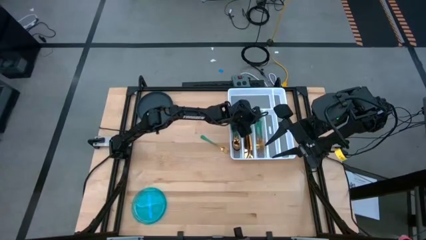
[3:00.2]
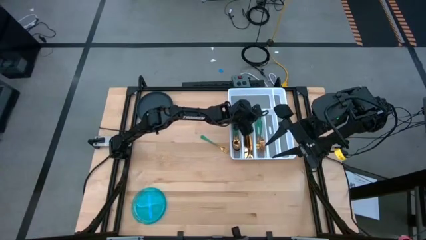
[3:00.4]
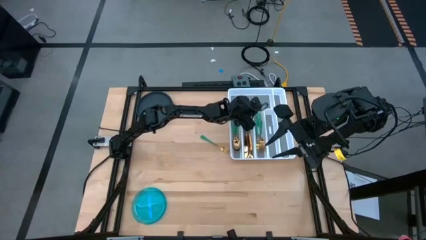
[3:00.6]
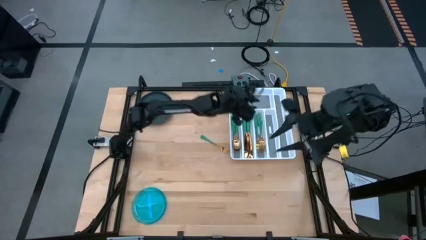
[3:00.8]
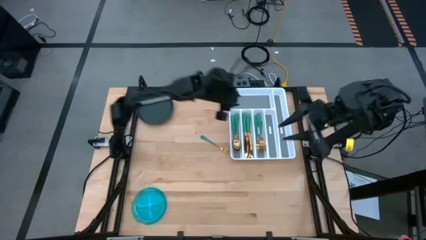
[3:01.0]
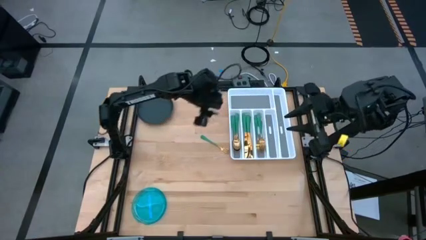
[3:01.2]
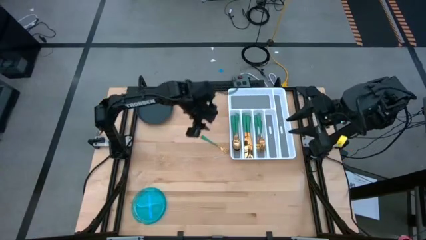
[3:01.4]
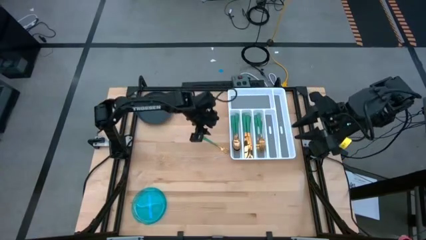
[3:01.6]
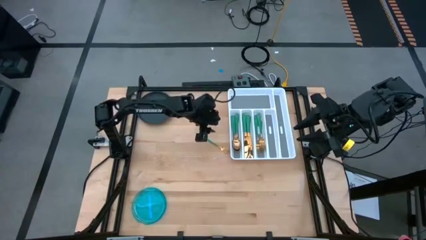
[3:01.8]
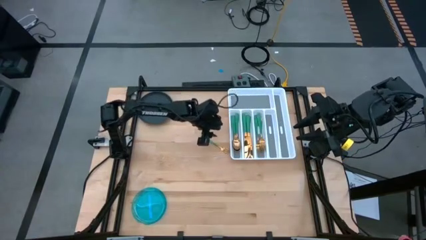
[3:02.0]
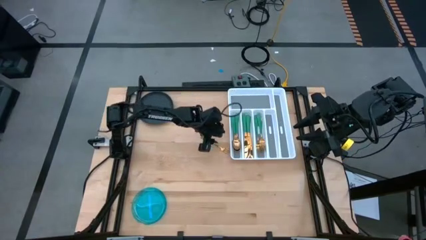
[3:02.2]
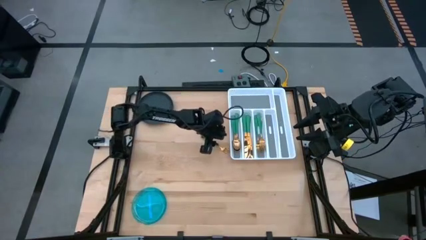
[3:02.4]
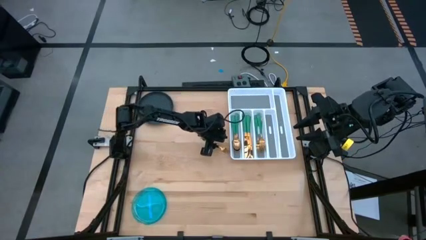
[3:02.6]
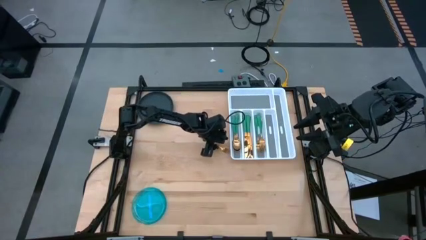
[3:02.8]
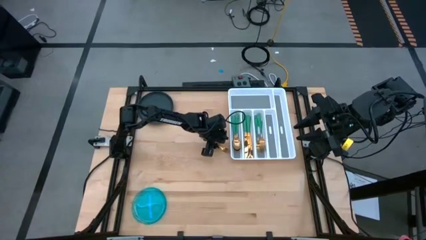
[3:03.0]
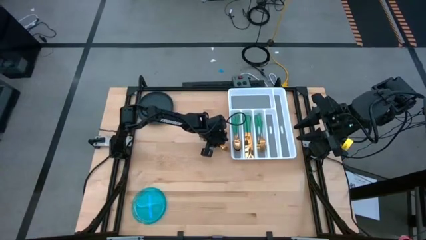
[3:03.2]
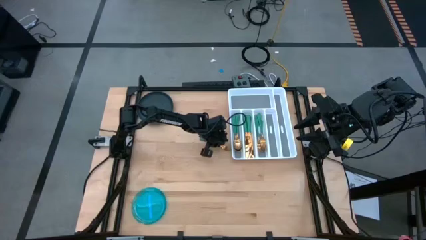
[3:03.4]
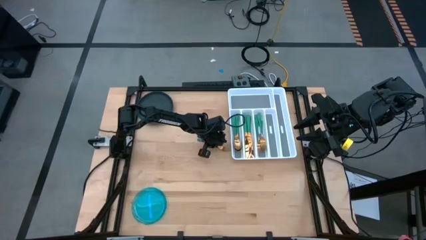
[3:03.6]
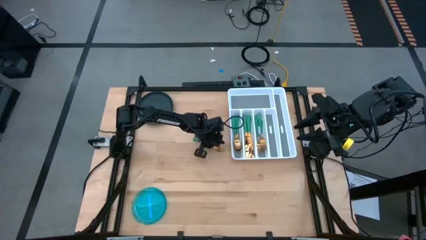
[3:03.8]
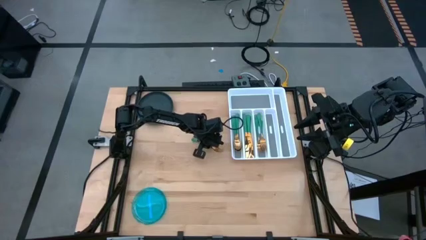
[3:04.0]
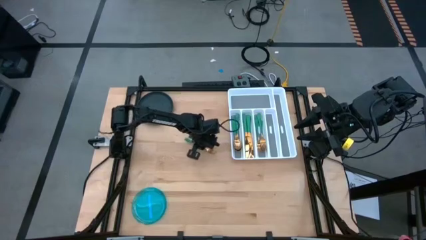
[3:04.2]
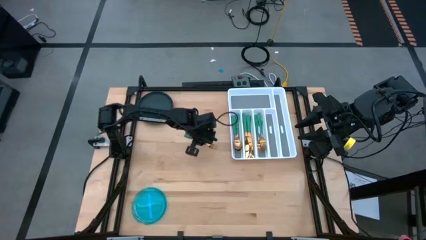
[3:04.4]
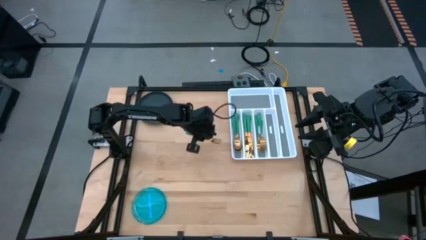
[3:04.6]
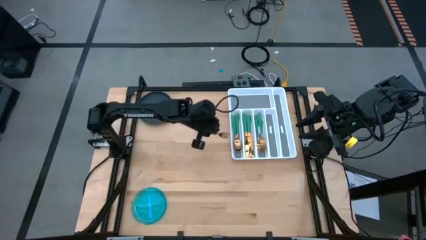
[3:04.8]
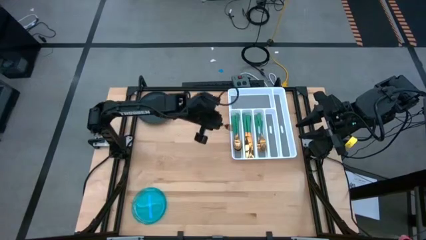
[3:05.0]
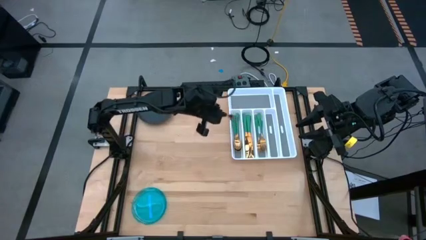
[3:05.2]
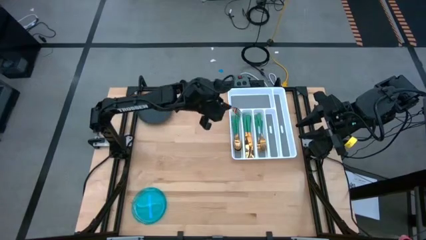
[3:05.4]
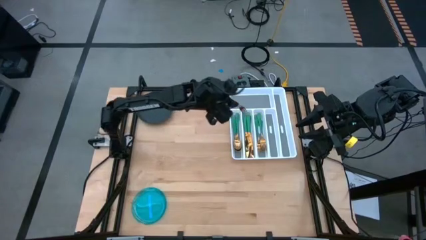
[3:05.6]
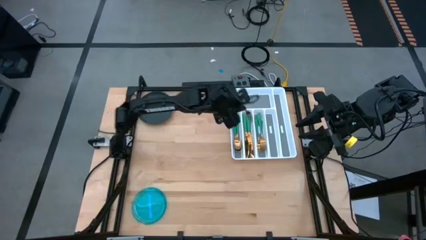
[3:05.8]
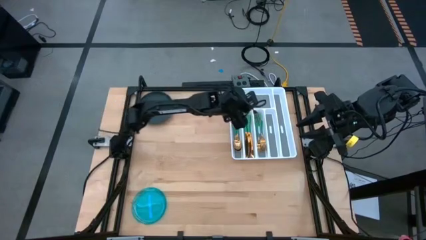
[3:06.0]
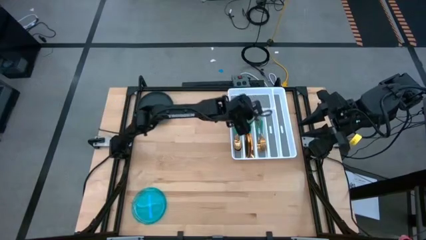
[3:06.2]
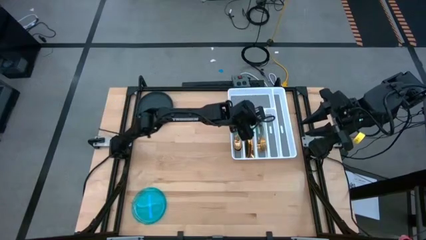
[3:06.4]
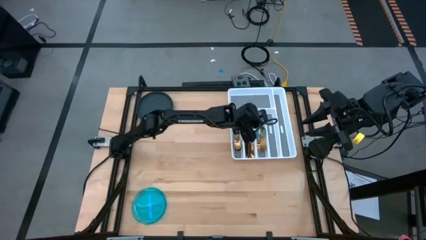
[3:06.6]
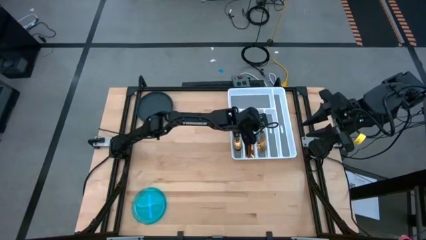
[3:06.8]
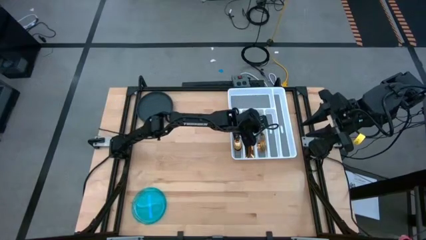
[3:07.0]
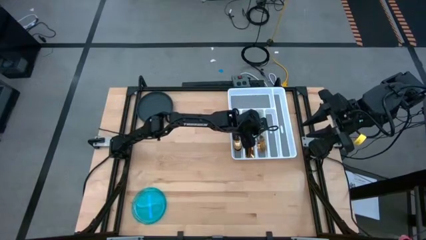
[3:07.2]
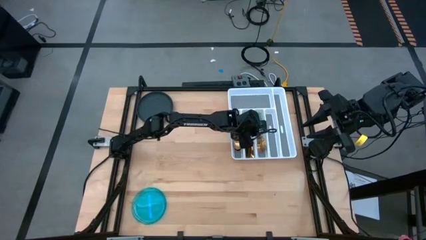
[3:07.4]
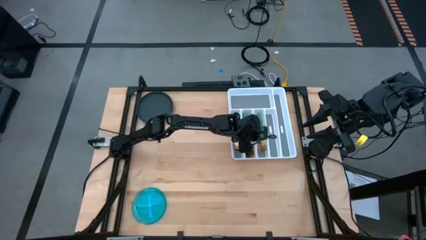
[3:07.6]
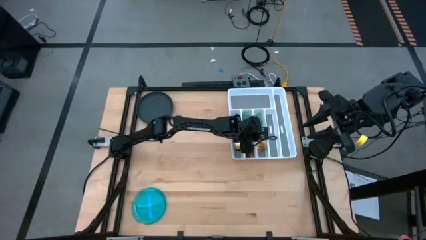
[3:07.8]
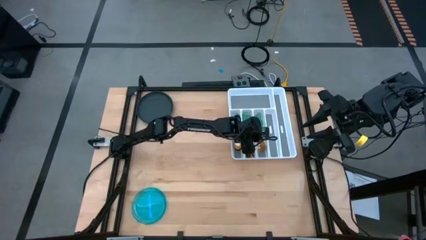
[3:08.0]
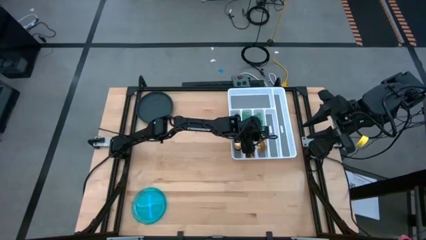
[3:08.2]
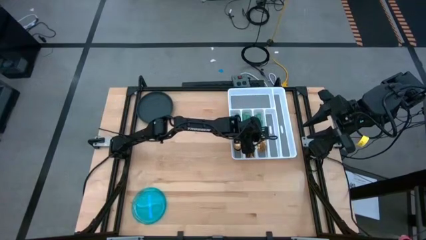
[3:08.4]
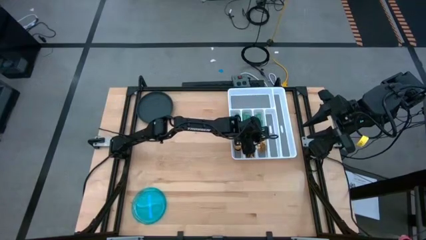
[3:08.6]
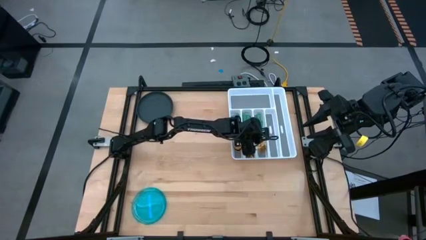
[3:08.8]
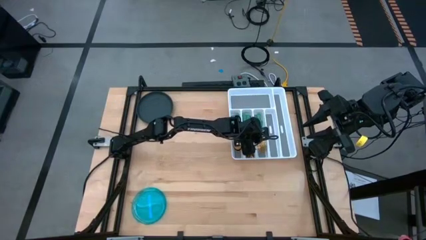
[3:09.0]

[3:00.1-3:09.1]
Task: Sort silverware
Put the green fork into the middle right slot of the white silverware tray

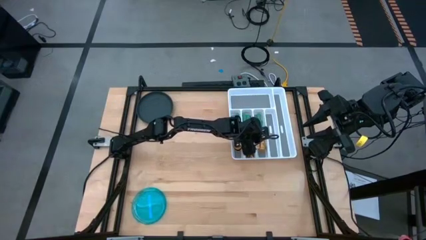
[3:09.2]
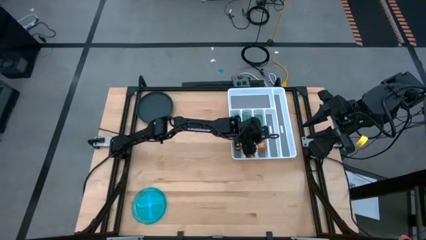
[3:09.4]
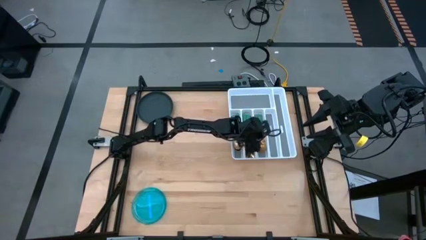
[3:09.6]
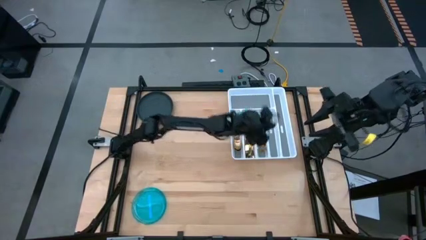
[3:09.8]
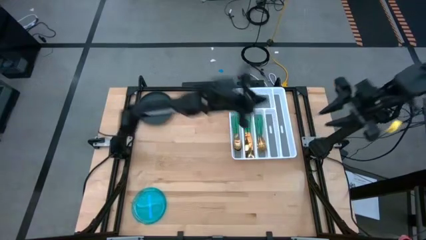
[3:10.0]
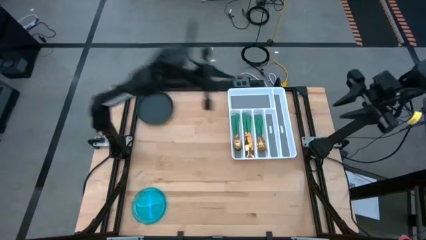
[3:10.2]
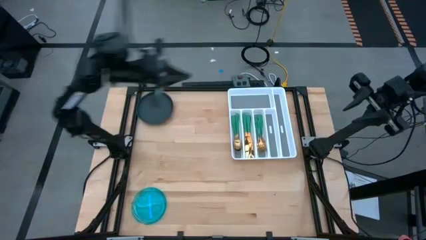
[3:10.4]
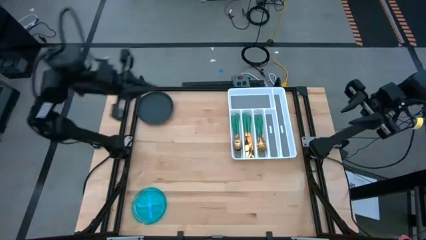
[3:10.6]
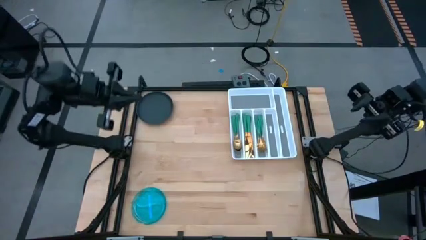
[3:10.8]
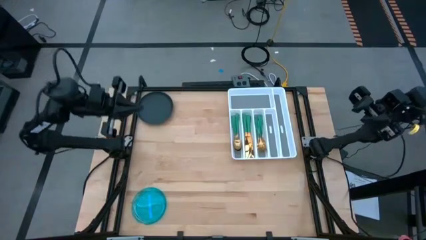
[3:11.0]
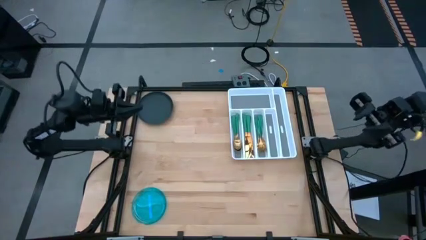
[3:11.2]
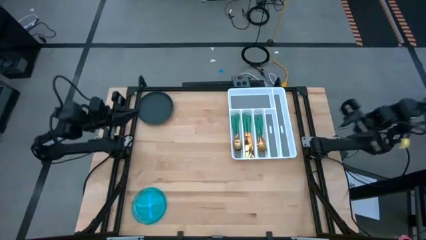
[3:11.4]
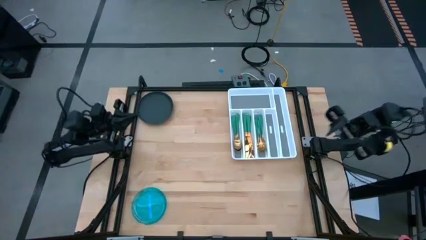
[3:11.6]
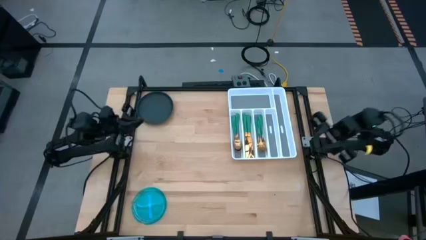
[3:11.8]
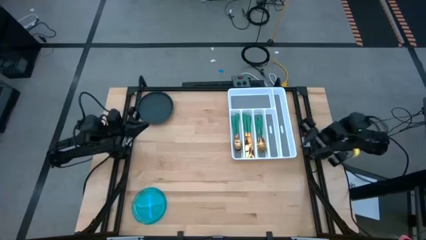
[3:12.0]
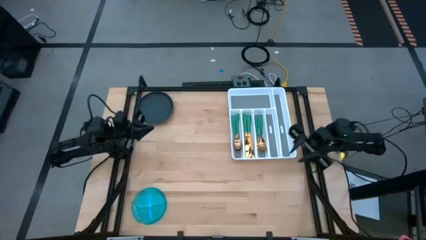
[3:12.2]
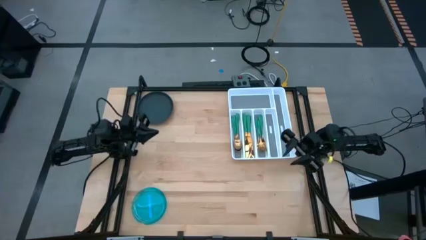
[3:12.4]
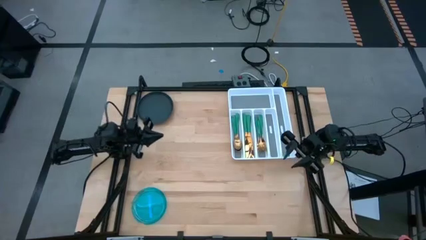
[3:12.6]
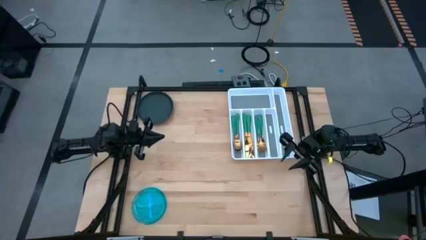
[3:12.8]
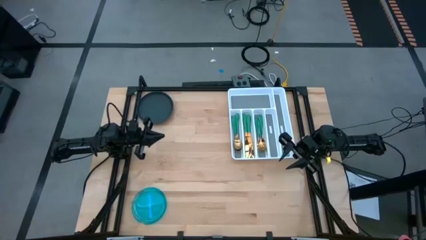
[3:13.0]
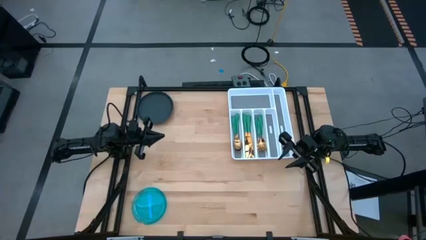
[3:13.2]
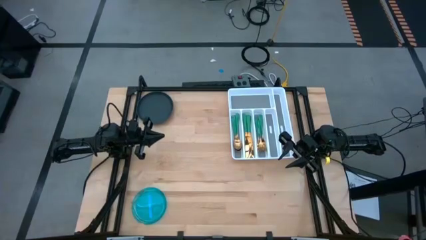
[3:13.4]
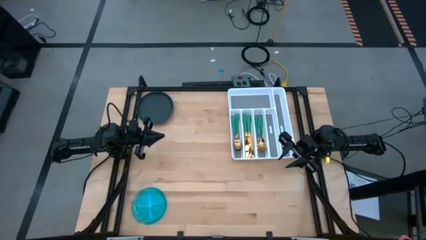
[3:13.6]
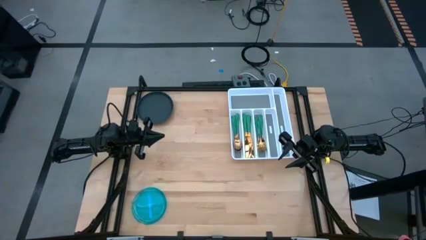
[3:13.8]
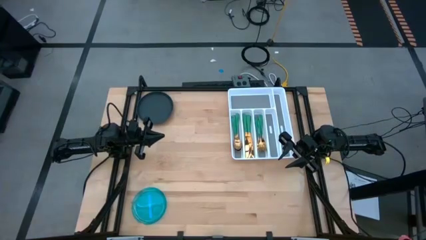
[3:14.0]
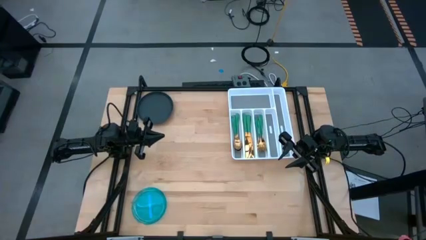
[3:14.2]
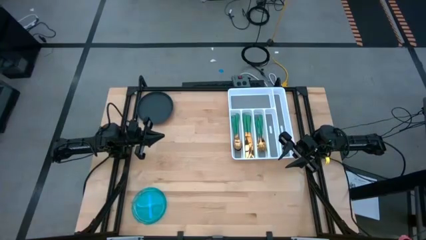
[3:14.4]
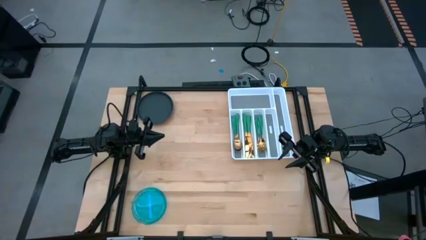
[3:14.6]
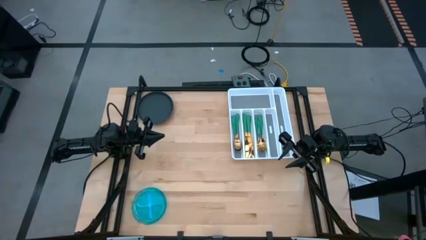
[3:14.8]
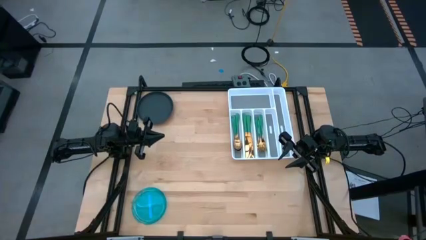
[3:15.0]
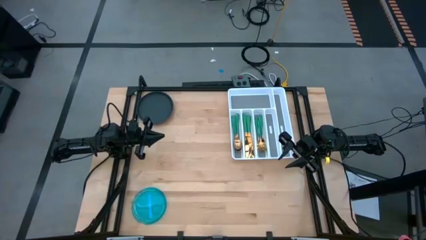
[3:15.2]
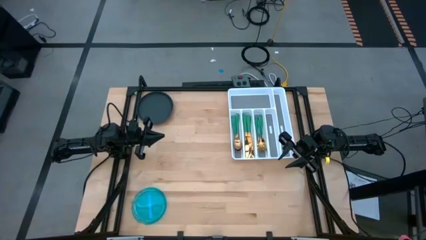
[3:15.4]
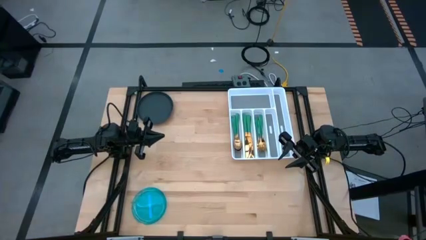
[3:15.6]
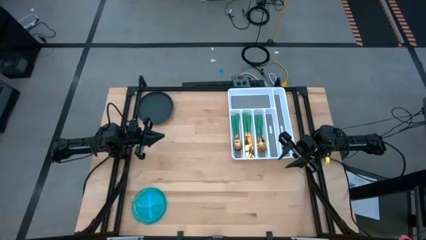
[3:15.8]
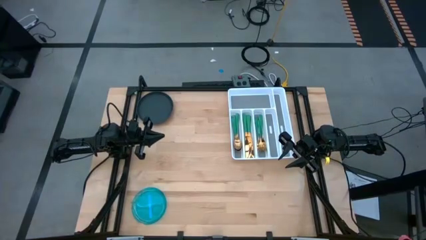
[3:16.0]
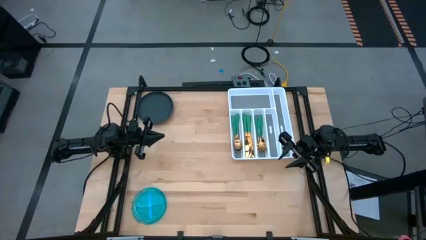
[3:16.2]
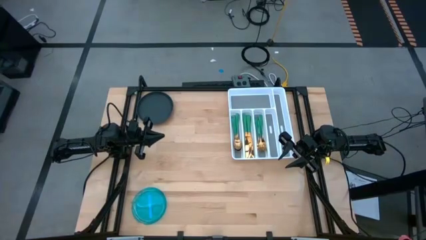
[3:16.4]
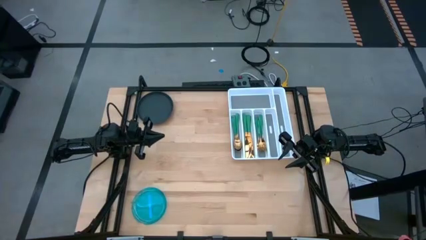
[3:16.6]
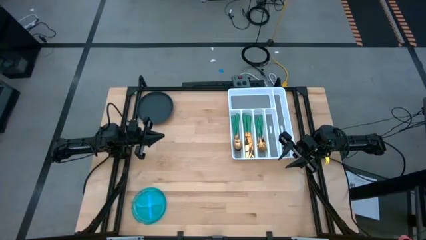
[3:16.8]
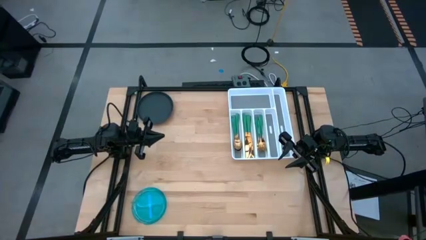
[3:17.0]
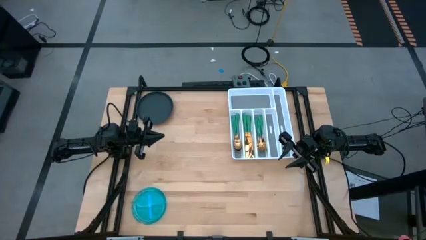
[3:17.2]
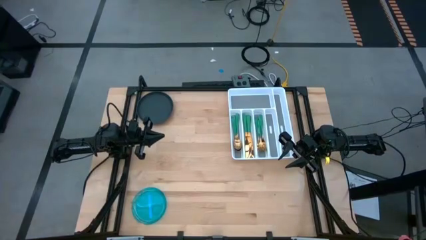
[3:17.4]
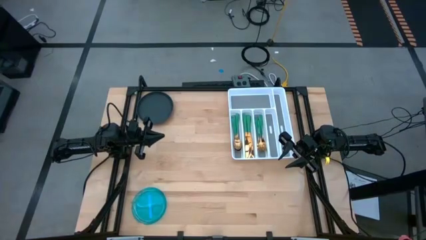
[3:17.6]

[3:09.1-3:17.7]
Return to Home Position
